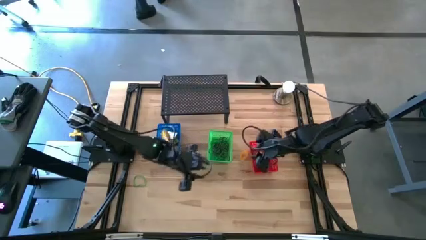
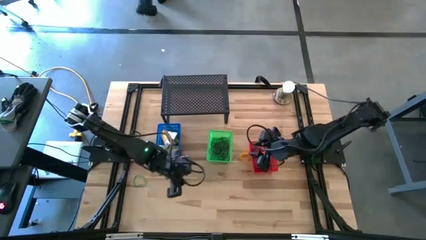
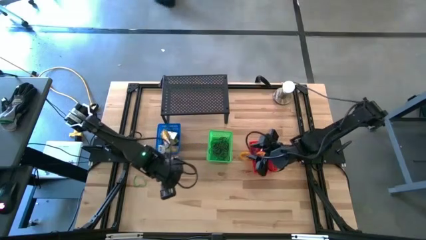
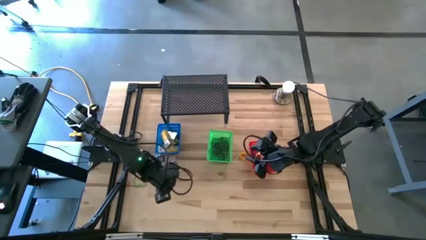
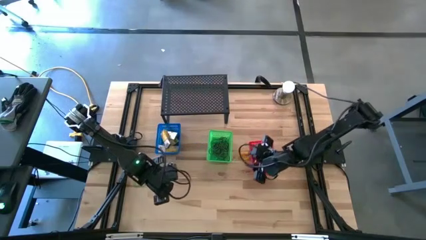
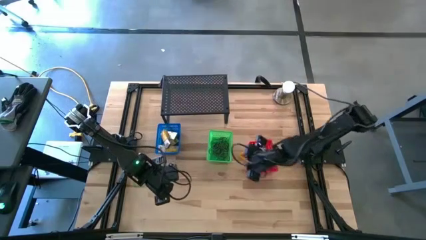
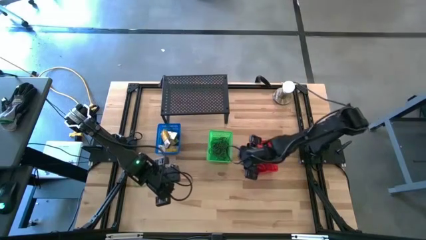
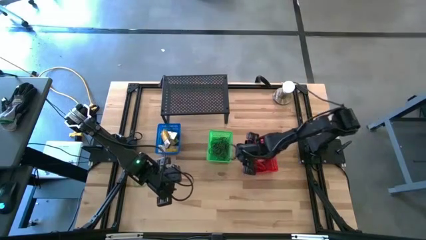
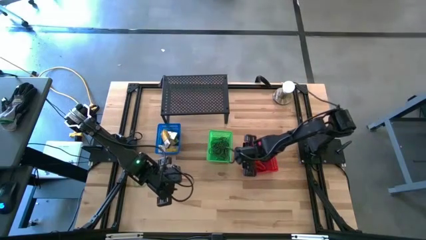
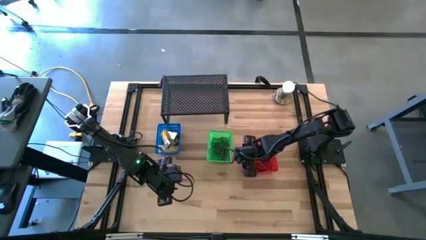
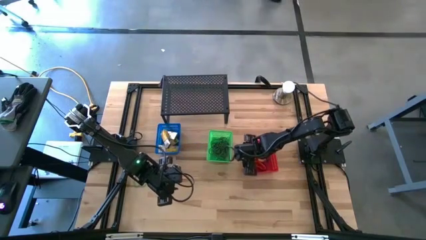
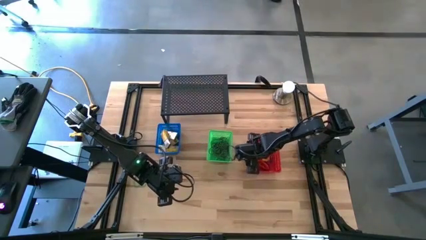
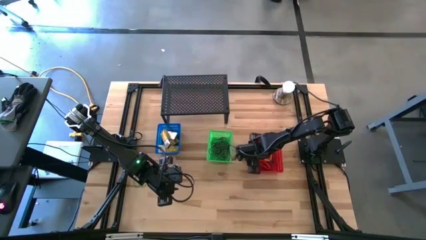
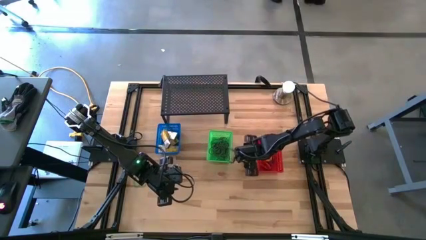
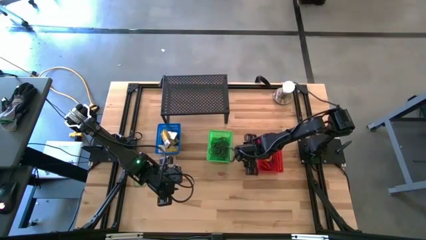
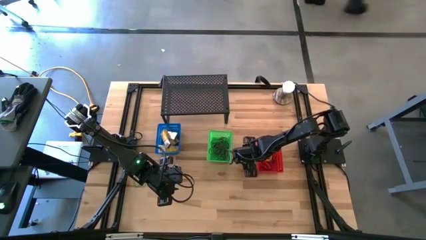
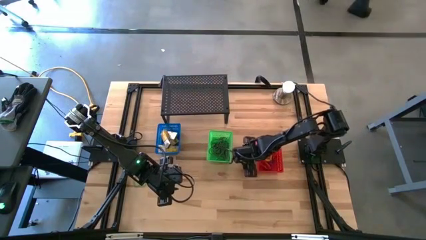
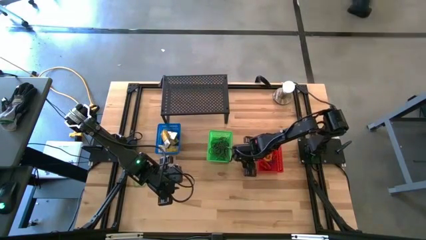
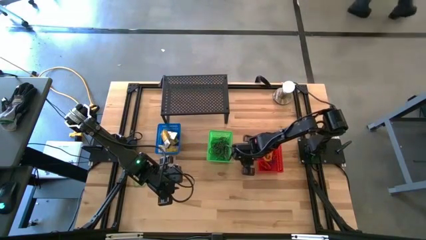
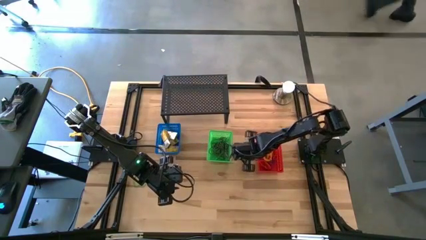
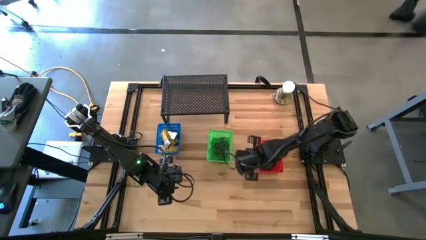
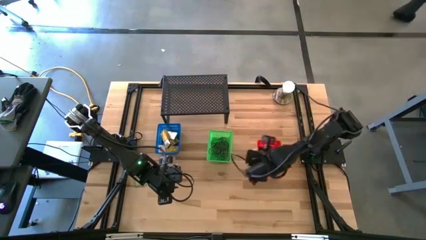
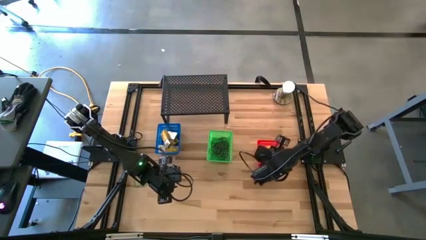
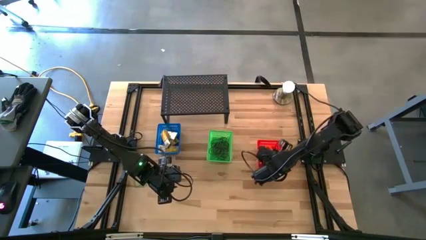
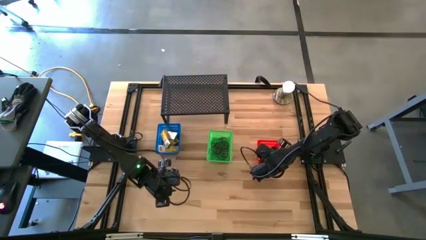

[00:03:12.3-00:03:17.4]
Task: Pick & Place Office Desk Supplies
Put the yellow spring keychain into the red bin

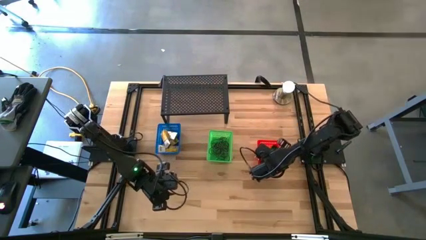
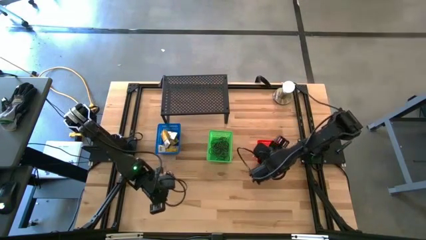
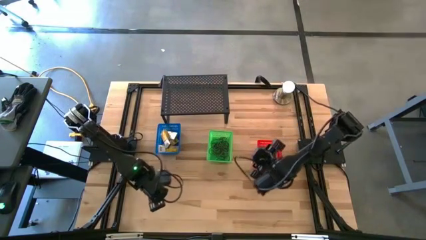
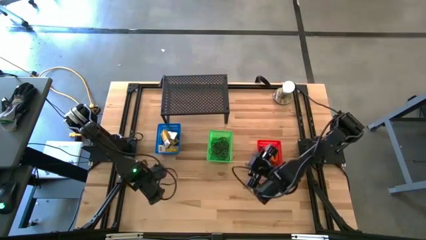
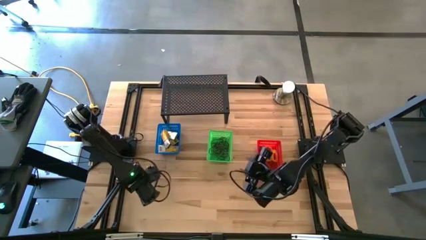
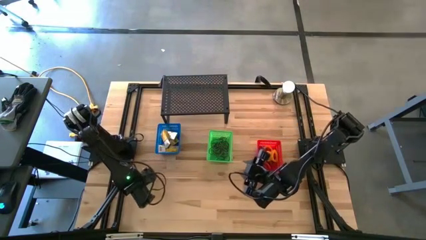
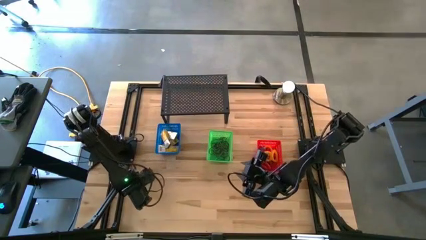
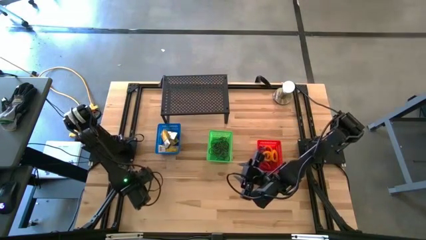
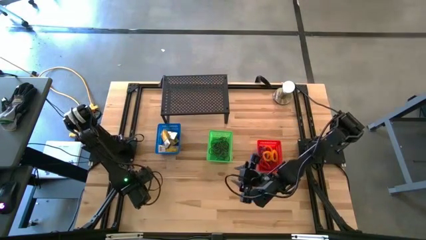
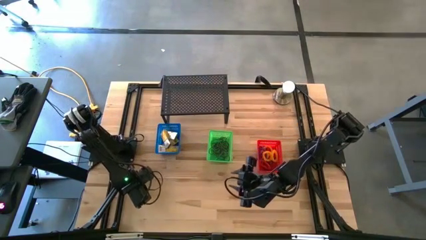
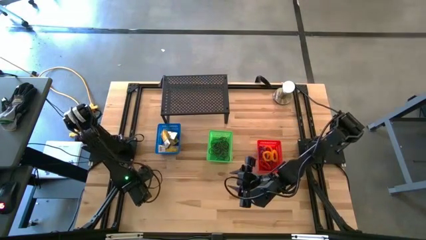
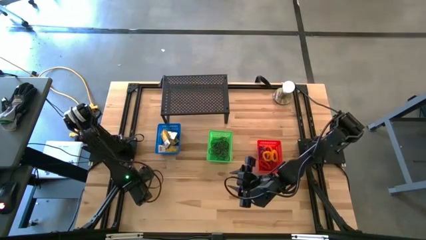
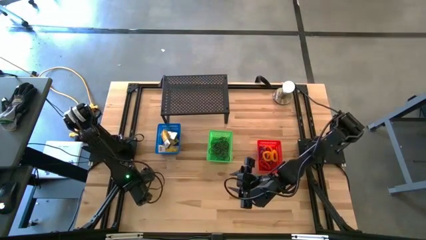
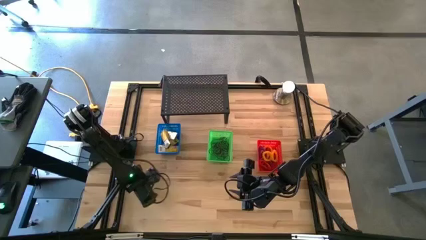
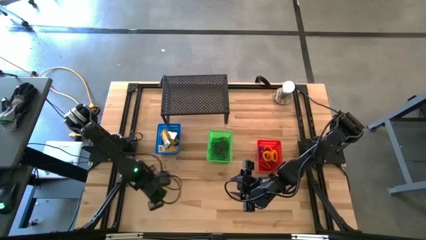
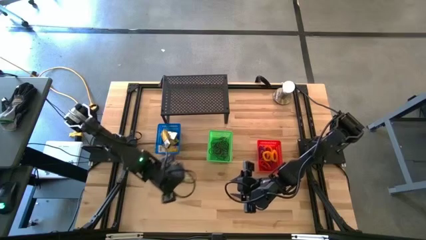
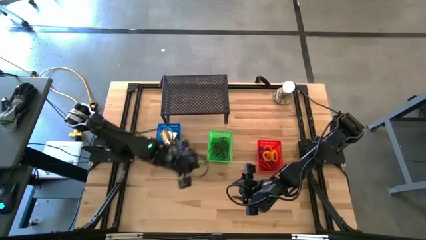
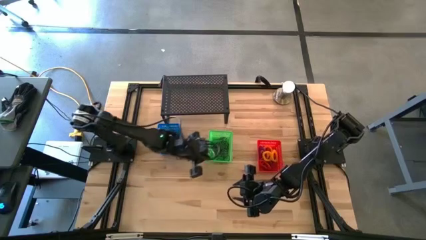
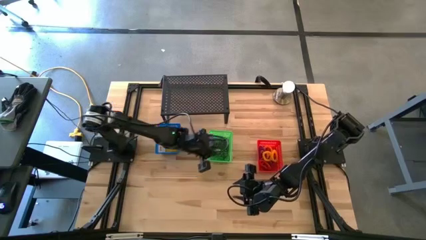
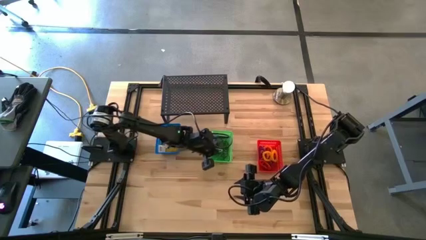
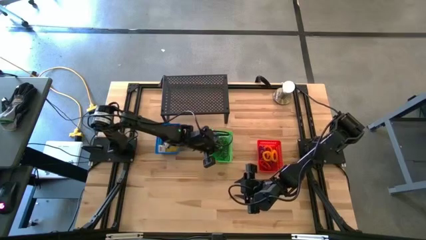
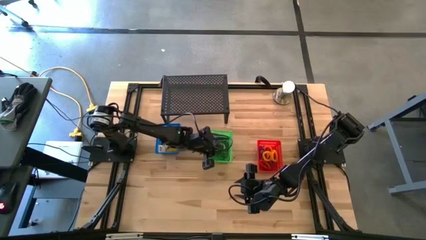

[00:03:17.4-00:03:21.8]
Put the green rubber band into the green bin

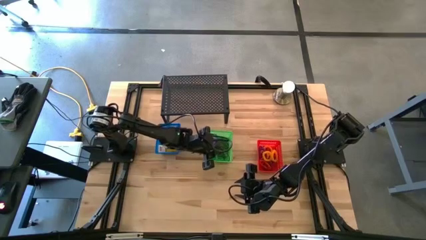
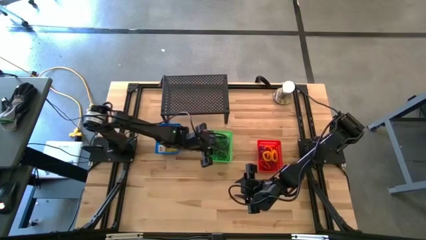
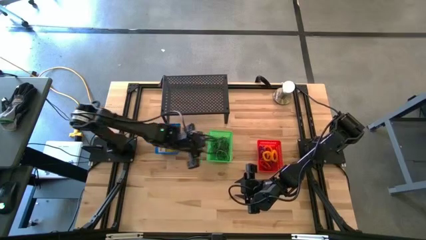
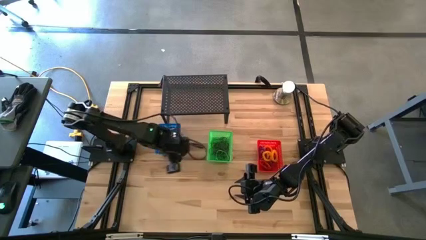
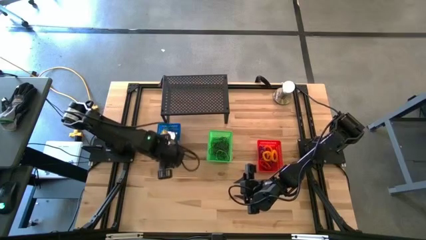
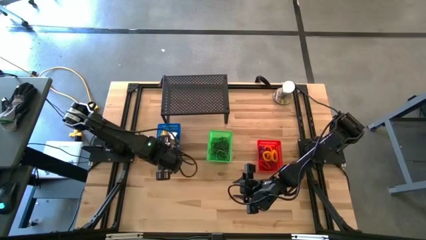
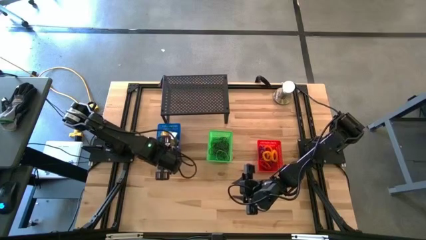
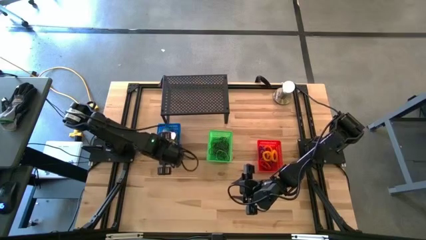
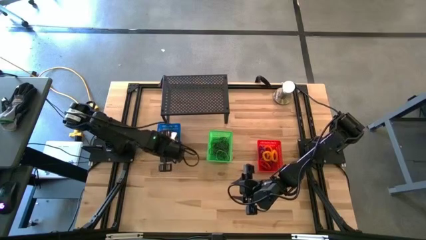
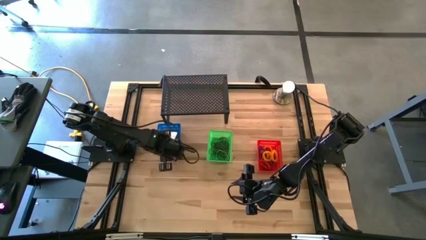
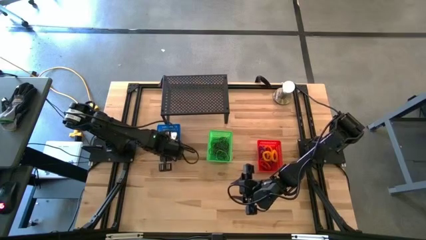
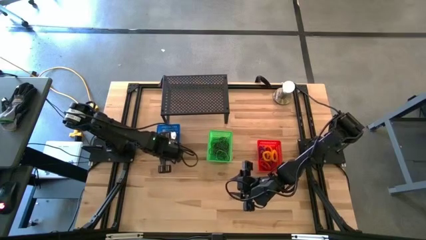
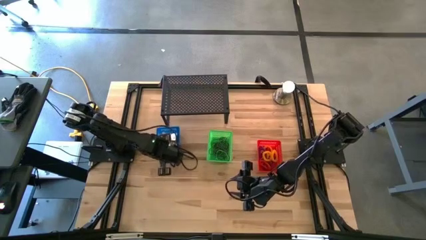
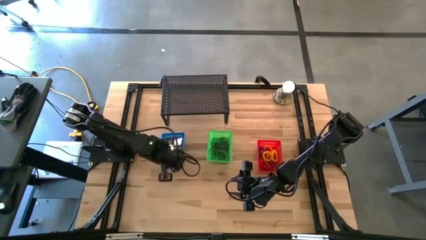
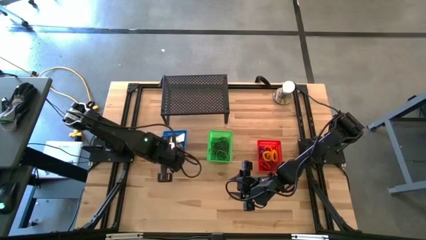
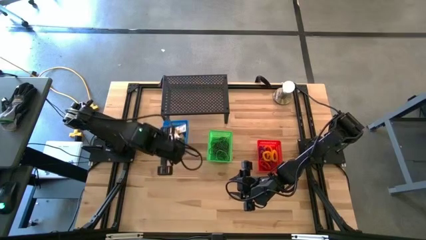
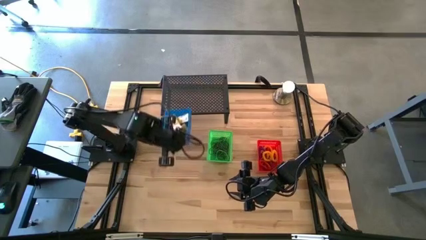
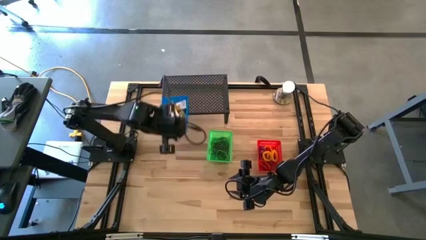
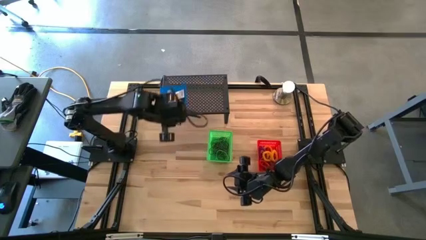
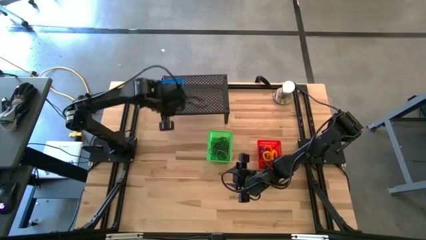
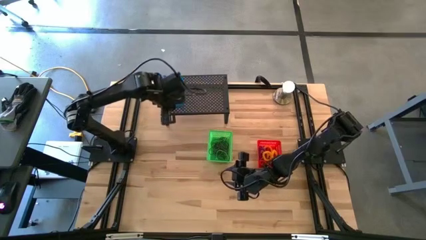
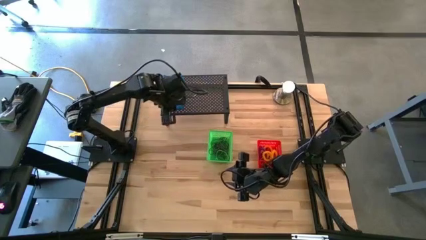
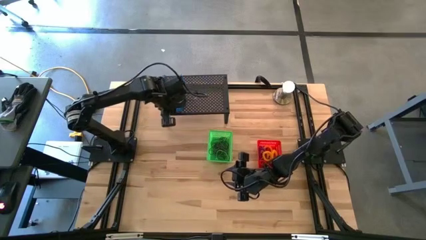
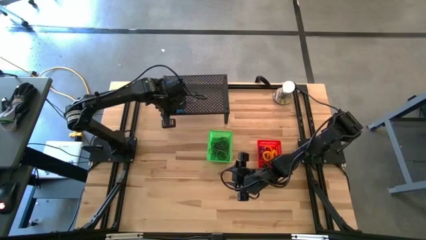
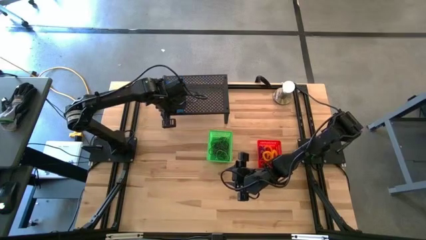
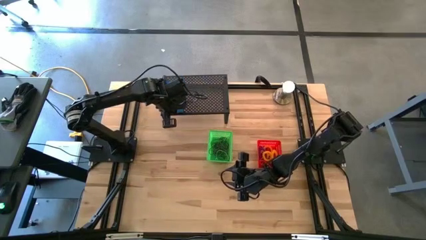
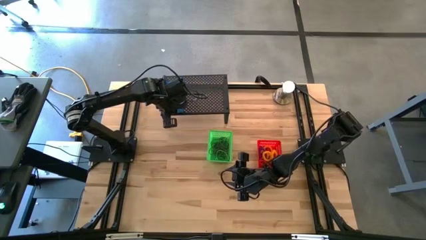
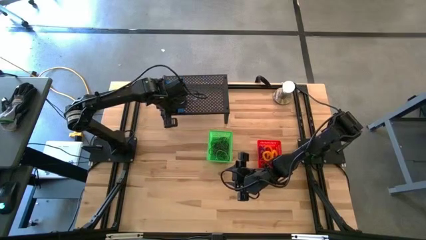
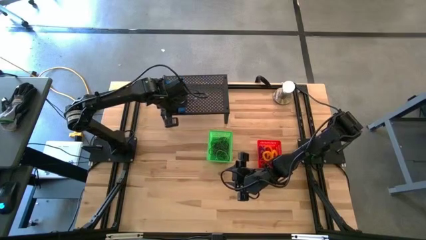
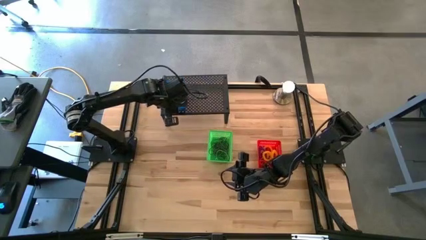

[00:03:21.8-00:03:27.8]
Put the blue bin on the shelf

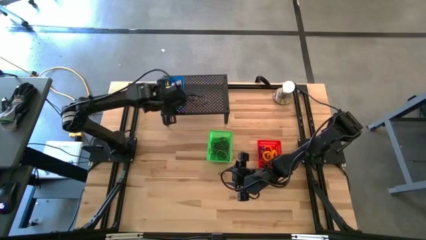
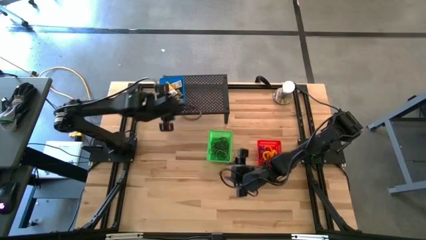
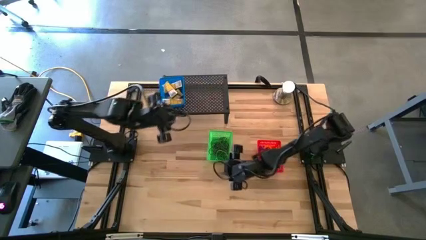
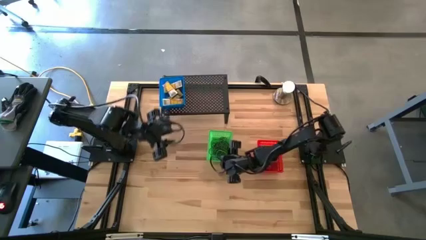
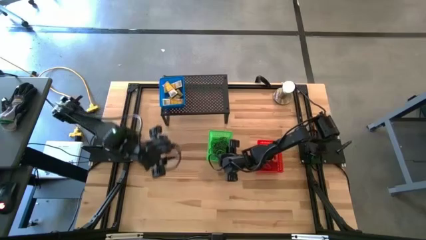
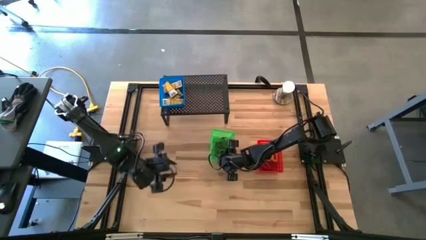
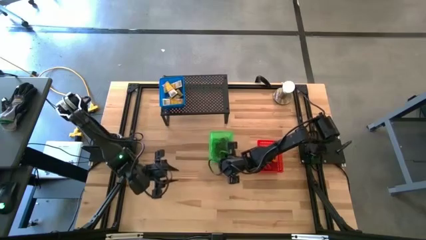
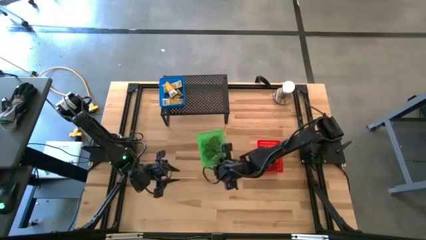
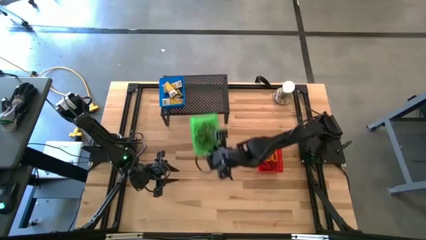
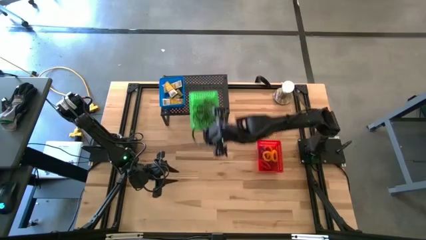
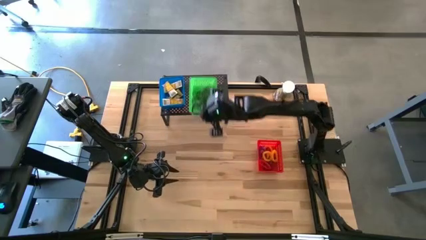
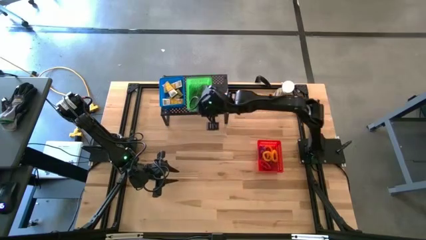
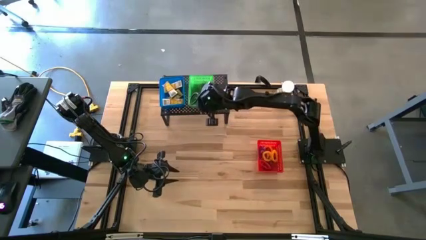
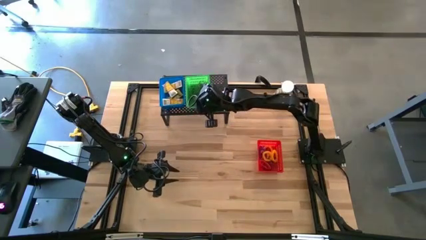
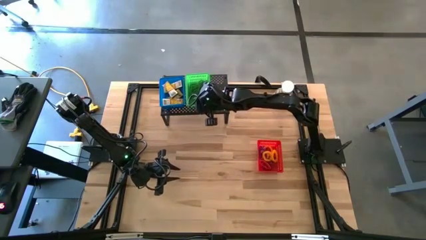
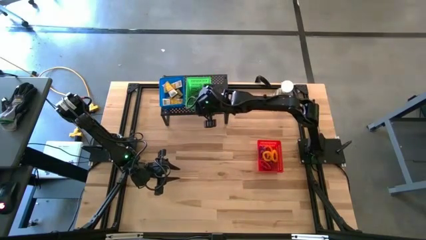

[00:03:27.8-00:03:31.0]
Put the green bin on the shelf
